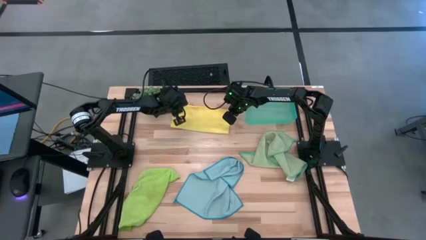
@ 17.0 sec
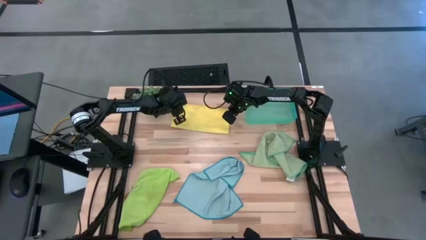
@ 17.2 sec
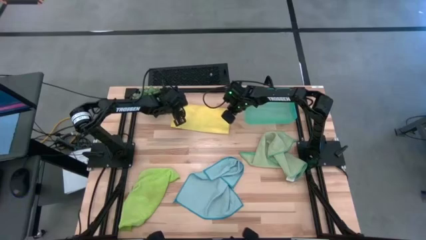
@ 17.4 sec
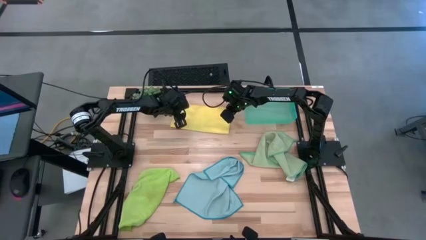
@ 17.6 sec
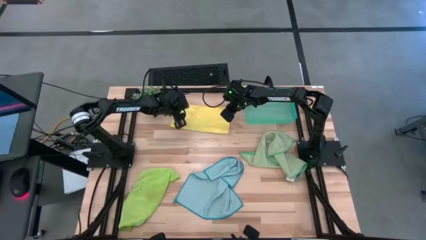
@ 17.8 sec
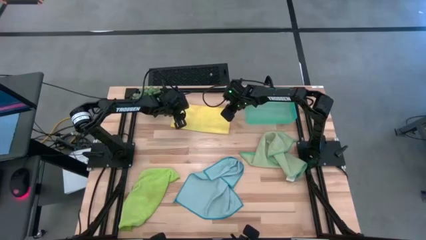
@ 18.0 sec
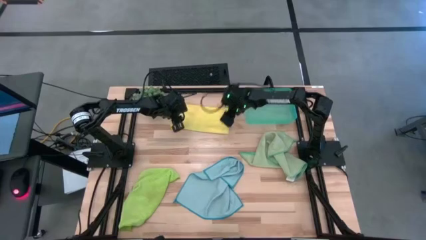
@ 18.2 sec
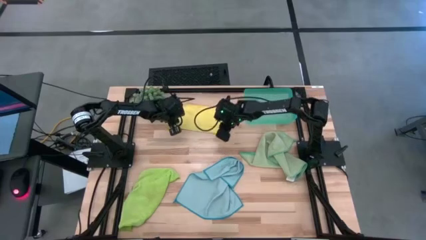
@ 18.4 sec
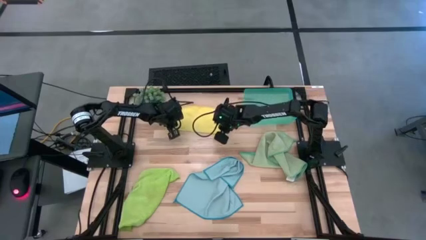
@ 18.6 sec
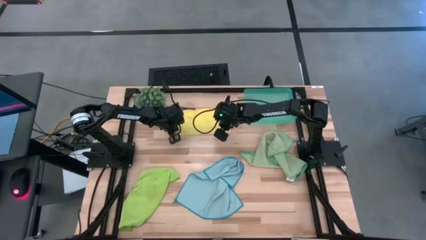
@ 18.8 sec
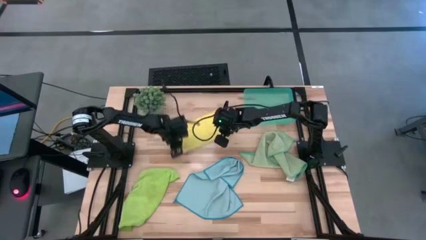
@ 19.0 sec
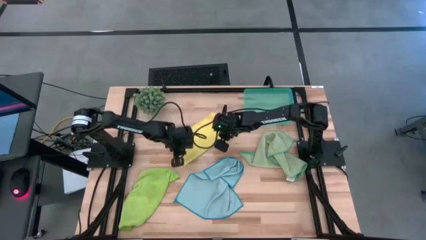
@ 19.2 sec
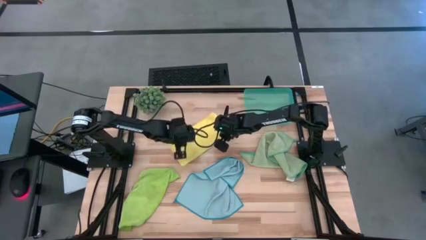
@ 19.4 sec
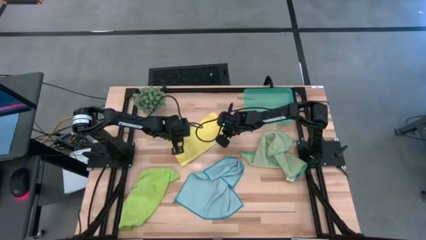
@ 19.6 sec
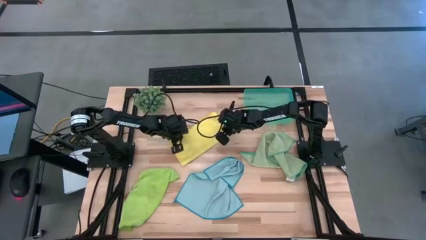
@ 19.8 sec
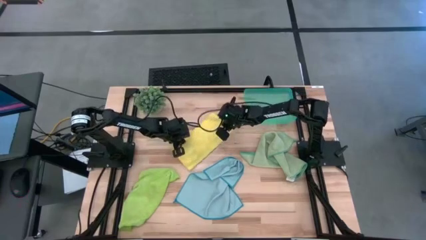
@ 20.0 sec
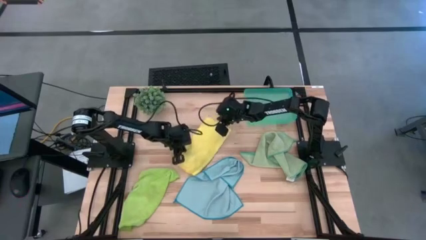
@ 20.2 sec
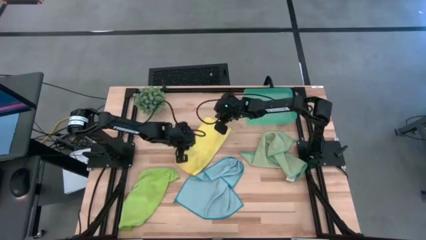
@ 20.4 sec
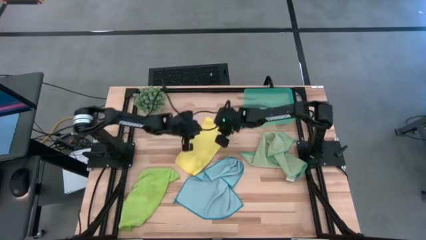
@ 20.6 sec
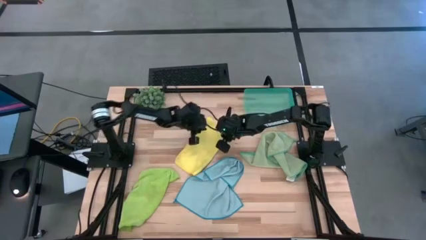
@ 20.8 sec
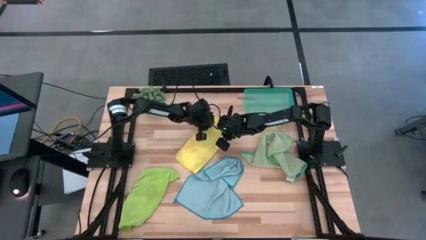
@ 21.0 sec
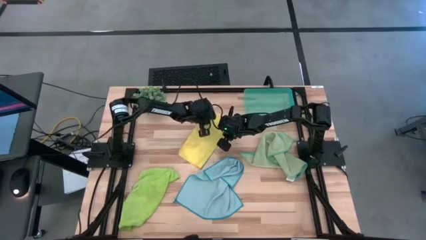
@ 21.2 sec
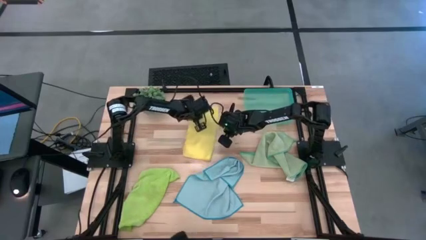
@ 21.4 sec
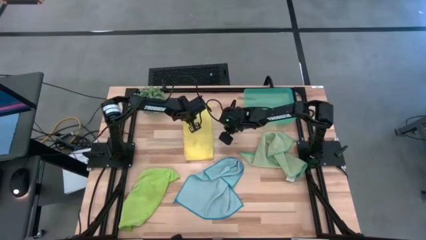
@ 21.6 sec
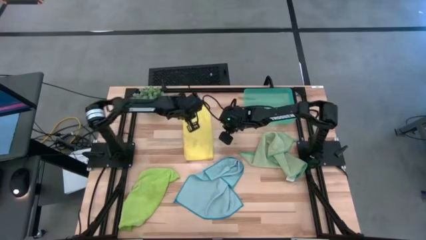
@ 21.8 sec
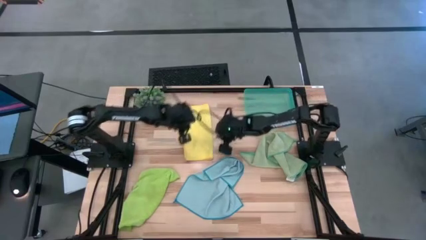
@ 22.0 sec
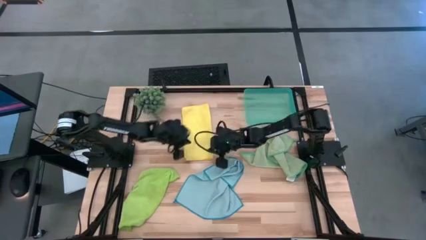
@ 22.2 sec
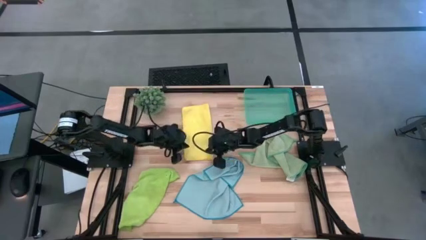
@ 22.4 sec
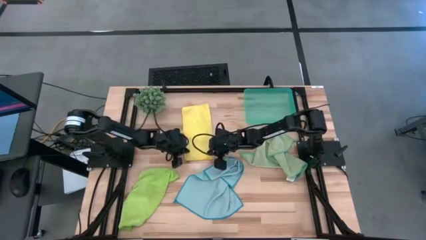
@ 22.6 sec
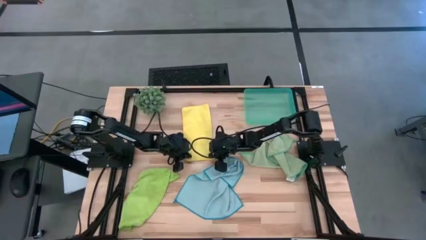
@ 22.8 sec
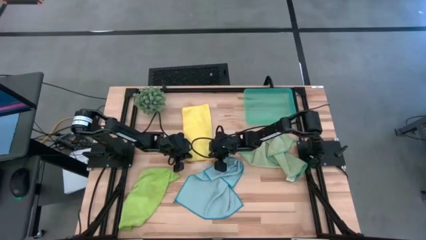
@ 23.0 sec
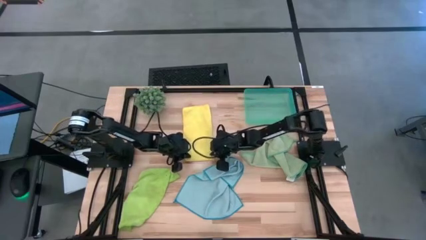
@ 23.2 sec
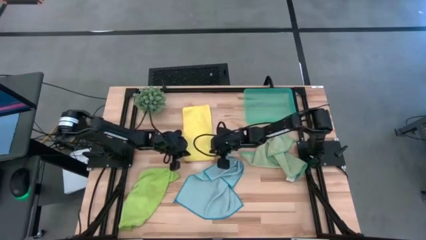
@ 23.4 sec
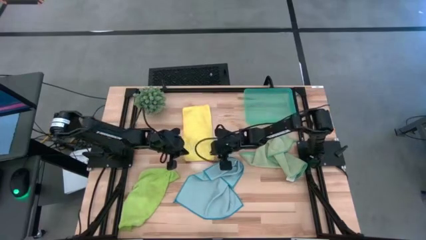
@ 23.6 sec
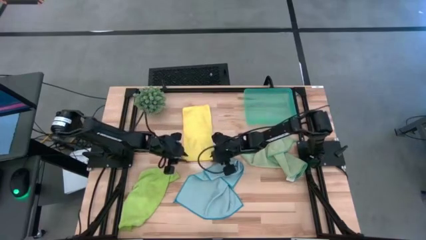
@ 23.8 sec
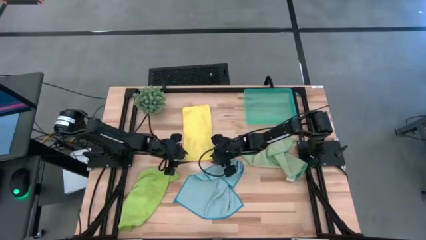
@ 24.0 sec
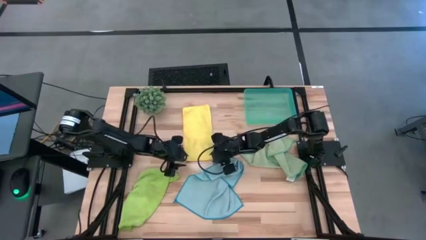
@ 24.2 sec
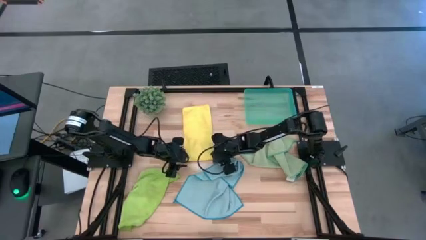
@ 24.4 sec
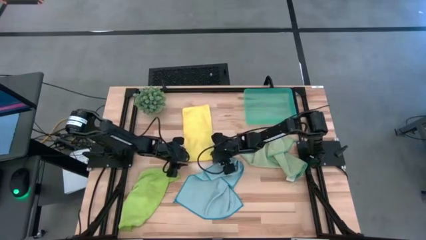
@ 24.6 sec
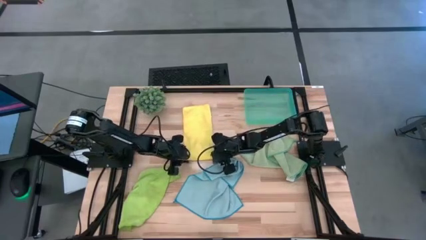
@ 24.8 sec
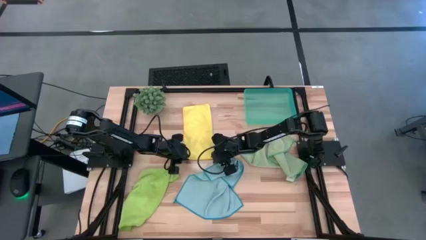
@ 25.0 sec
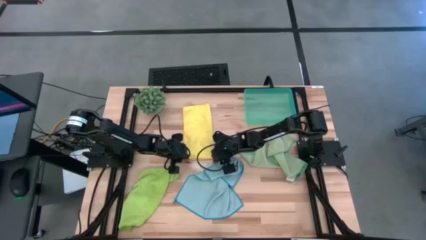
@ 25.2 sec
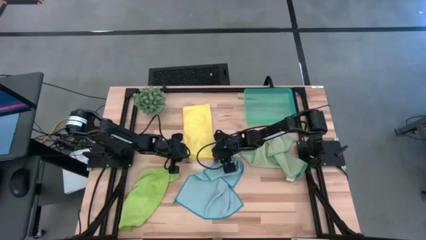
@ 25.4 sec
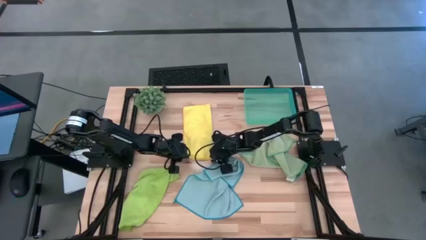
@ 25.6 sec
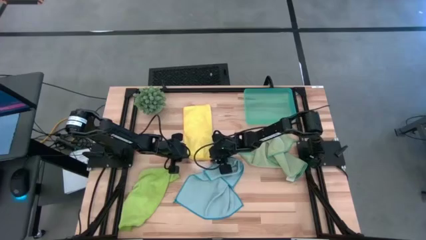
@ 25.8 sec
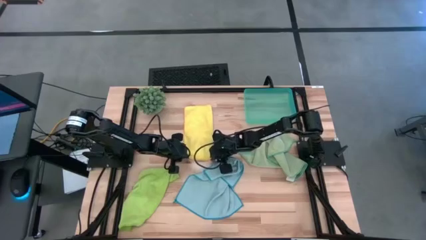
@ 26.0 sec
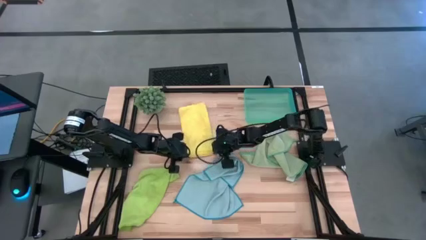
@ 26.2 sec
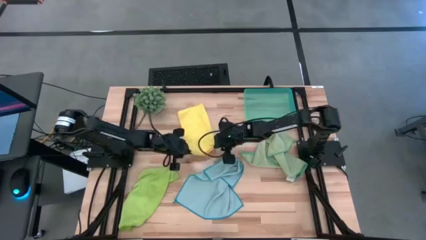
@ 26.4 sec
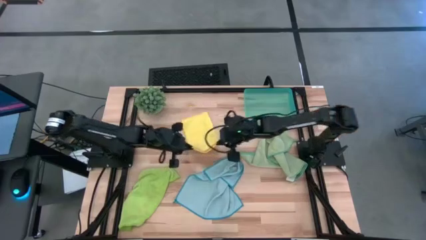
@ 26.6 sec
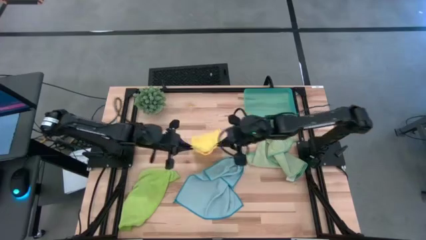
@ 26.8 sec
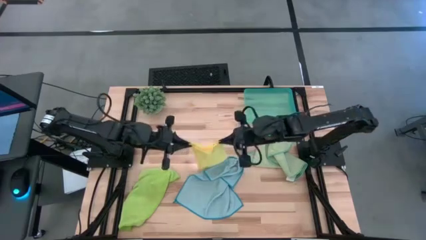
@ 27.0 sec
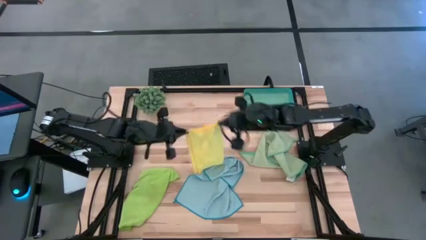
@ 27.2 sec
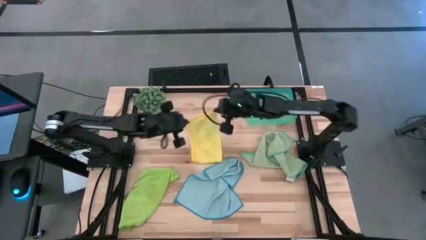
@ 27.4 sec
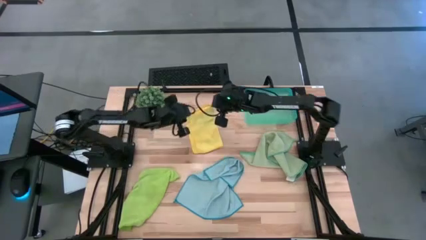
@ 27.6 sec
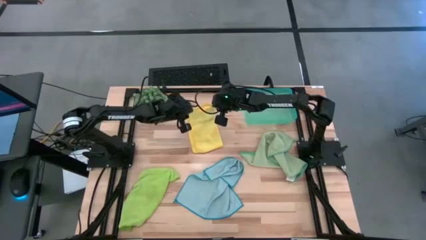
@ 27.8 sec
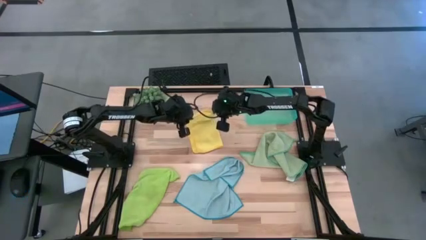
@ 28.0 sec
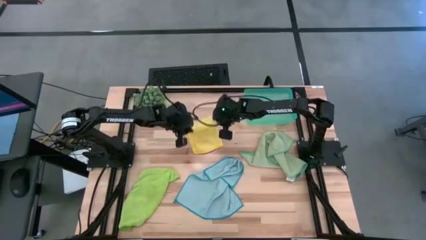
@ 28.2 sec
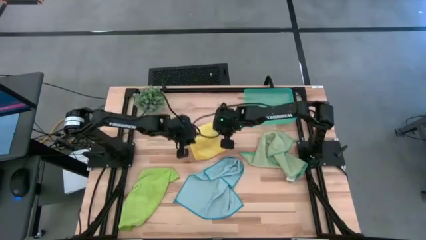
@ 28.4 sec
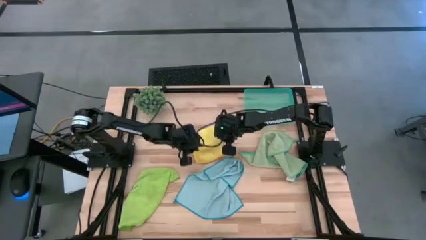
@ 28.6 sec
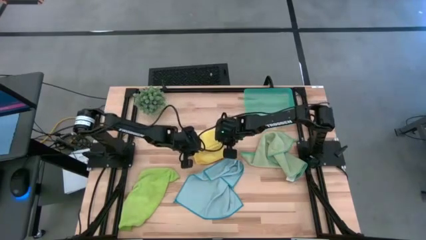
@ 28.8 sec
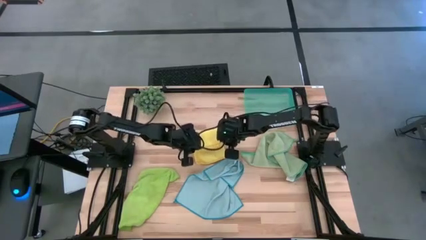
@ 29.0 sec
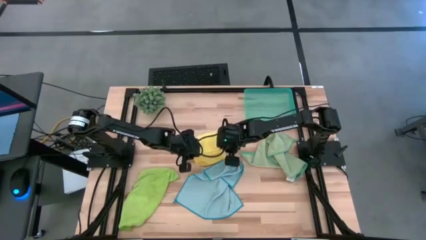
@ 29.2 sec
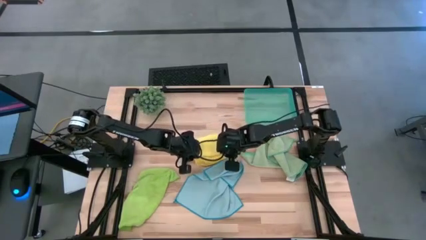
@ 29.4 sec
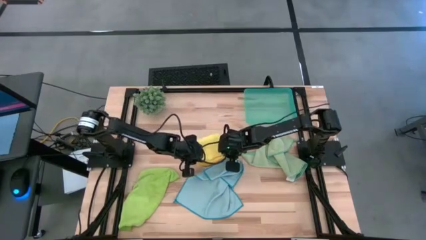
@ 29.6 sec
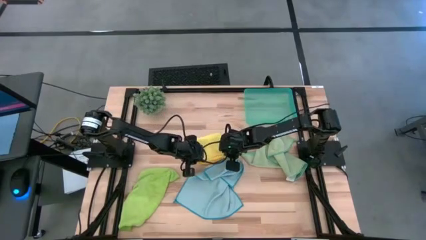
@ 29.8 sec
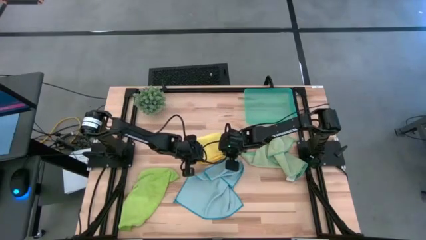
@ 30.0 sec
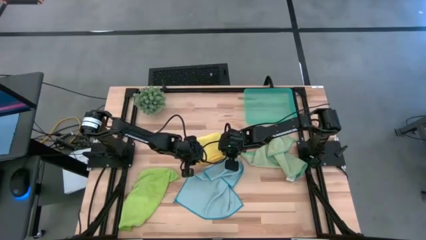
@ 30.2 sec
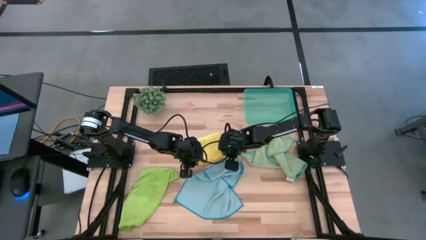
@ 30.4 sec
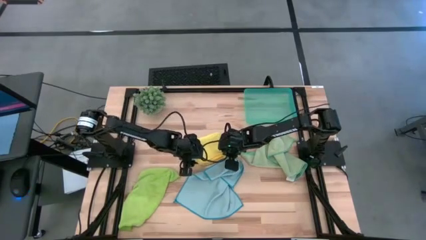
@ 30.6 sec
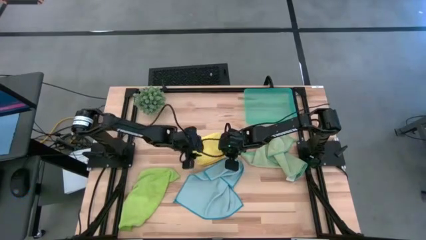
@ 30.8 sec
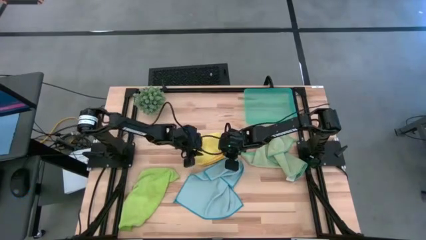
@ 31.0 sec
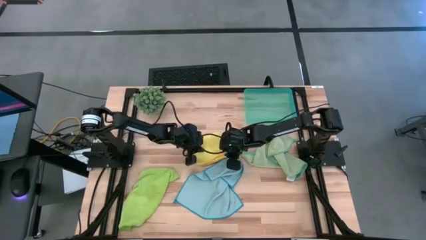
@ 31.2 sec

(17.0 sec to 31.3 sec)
Task: Fold microfiber towels
Fold the yellow microfiber cloth

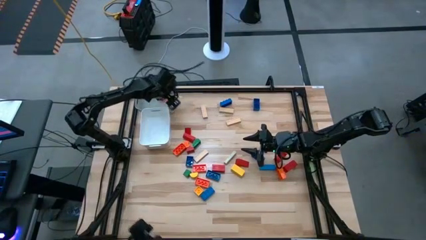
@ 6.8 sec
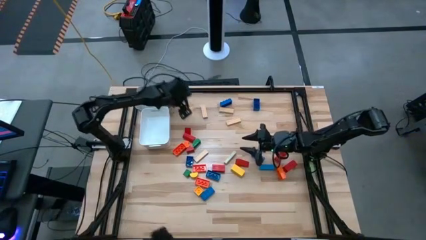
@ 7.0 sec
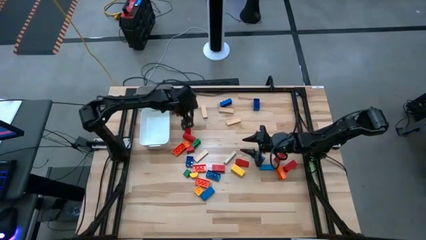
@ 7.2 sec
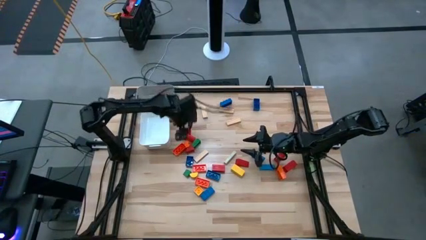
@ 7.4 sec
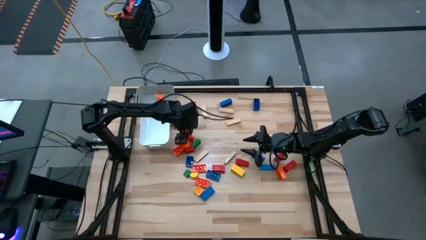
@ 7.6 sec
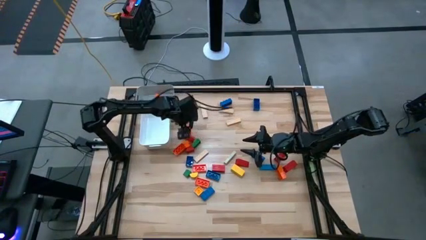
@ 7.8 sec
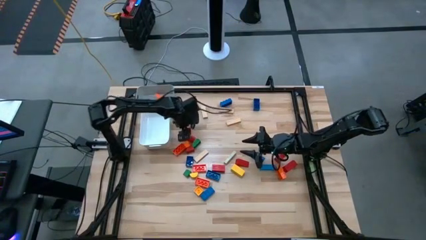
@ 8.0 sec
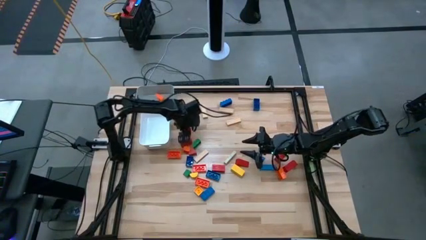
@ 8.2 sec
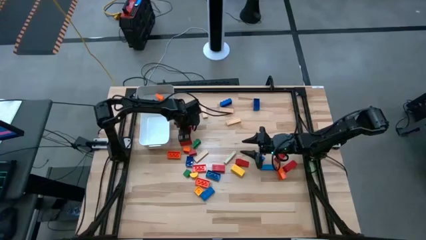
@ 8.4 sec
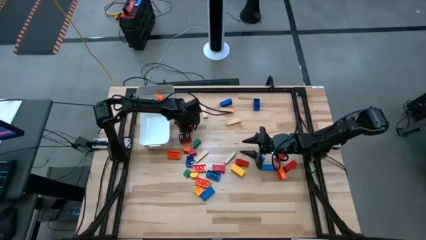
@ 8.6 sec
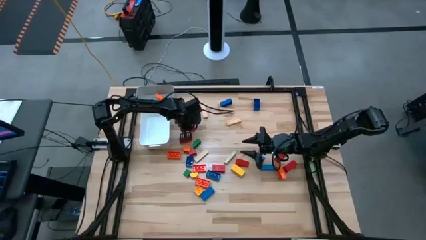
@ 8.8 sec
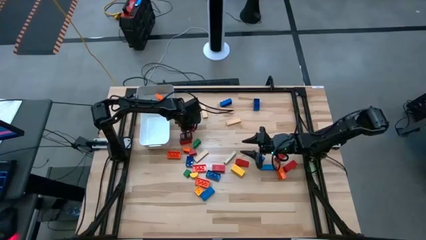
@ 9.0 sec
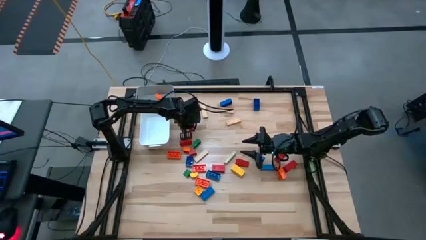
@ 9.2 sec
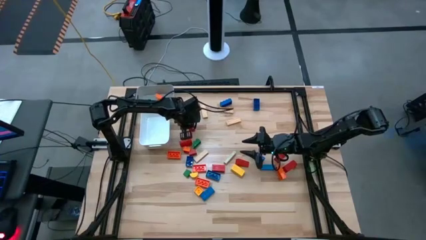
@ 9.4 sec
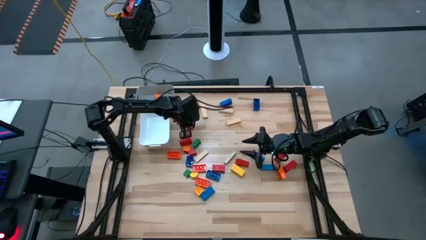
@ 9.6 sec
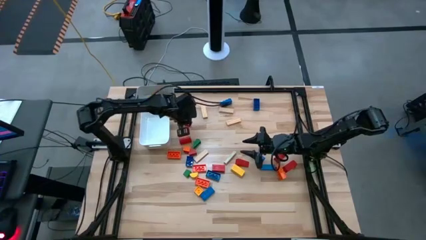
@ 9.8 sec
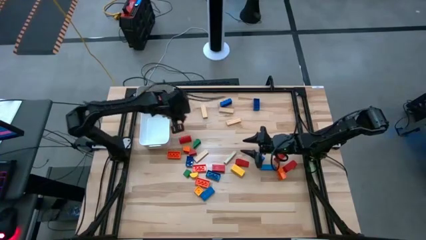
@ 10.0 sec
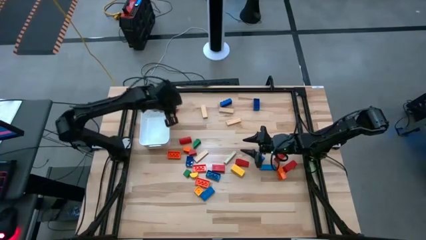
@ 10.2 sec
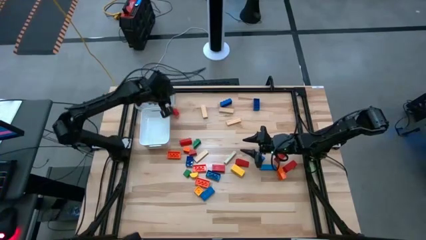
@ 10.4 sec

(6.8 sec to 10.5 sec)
Task: Sort blocks by size
Put the small red wooden block into the gray bin
